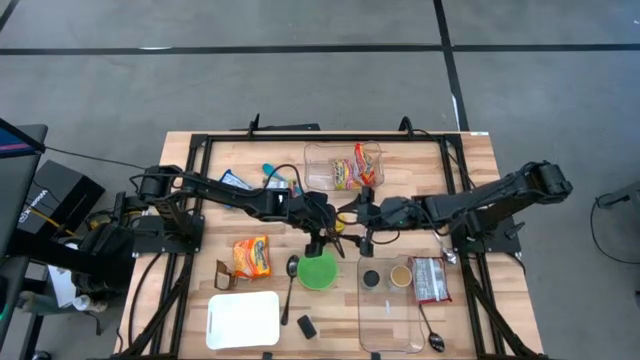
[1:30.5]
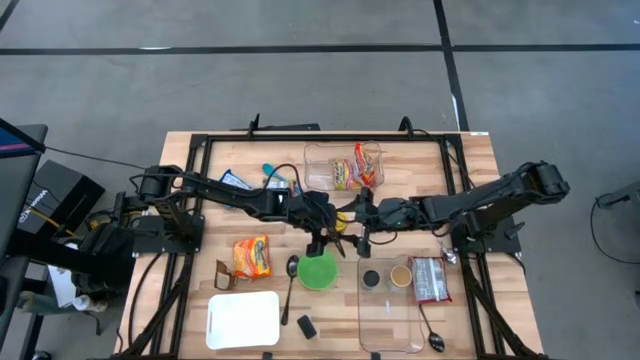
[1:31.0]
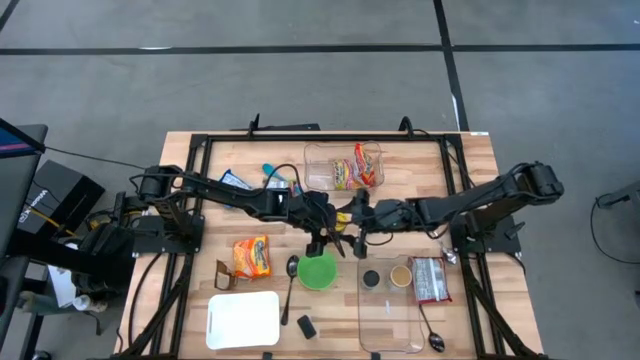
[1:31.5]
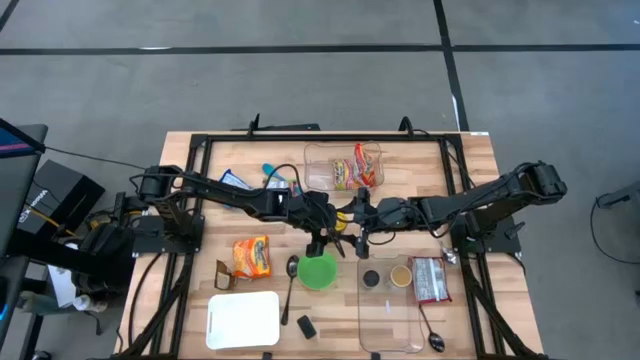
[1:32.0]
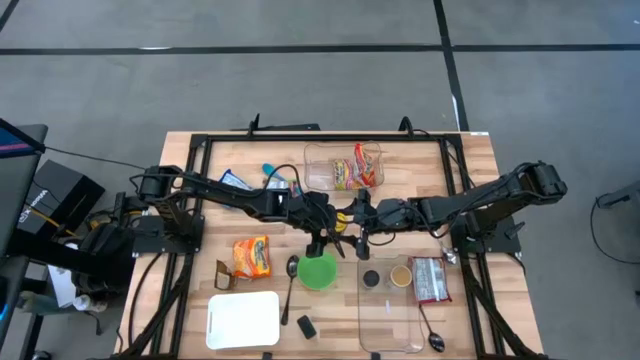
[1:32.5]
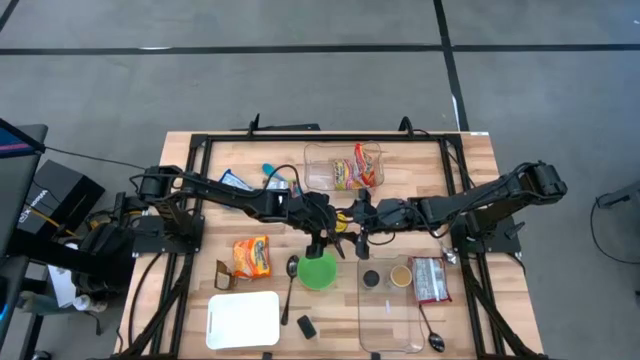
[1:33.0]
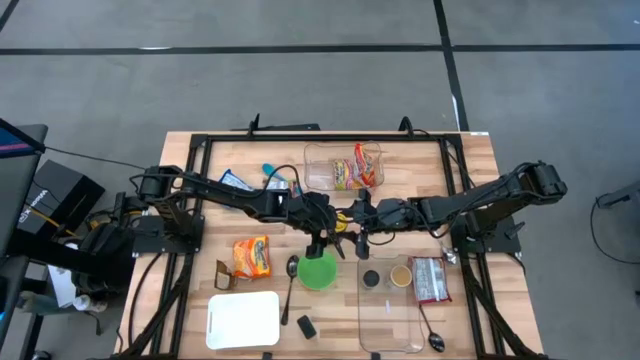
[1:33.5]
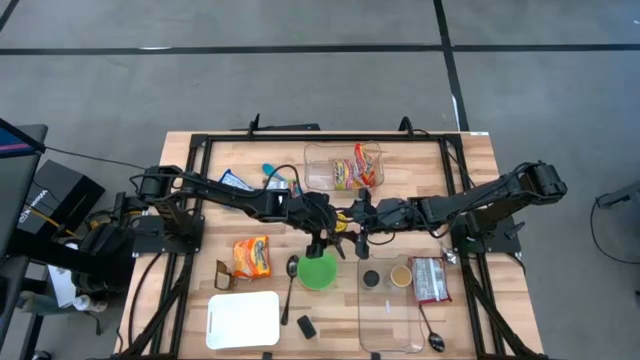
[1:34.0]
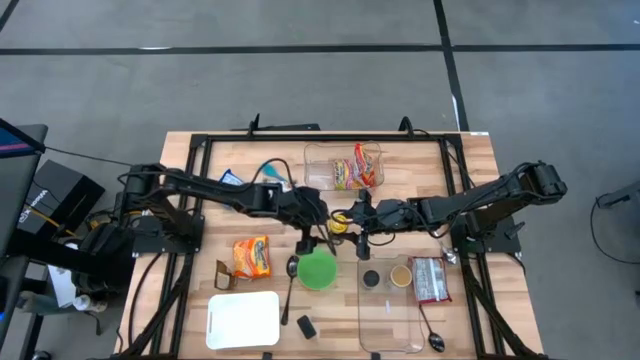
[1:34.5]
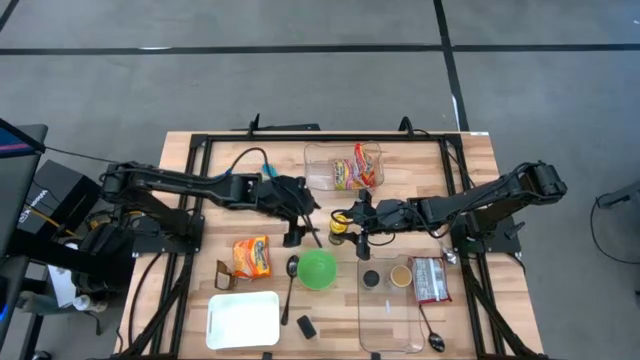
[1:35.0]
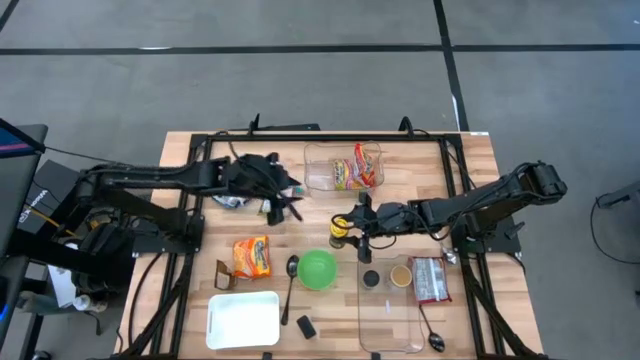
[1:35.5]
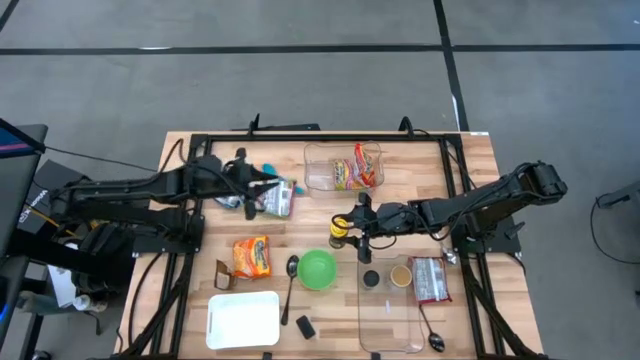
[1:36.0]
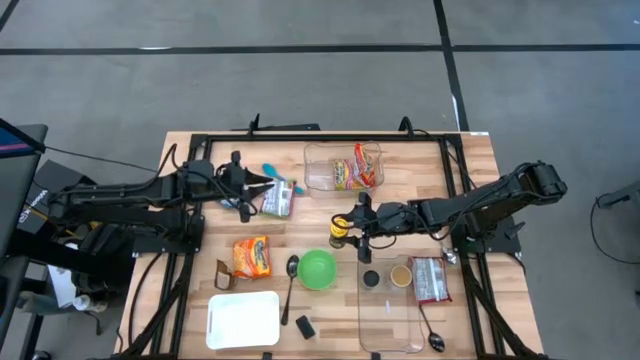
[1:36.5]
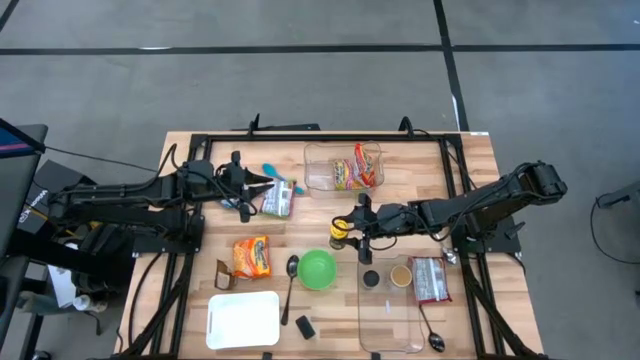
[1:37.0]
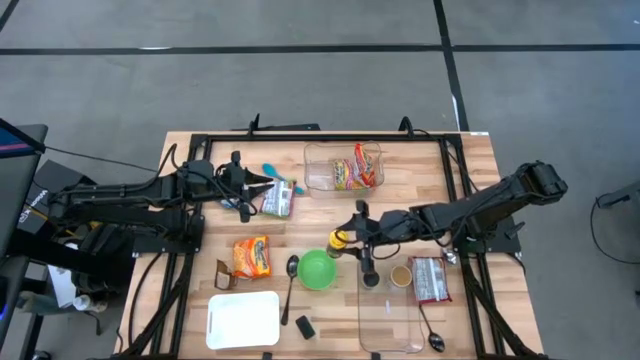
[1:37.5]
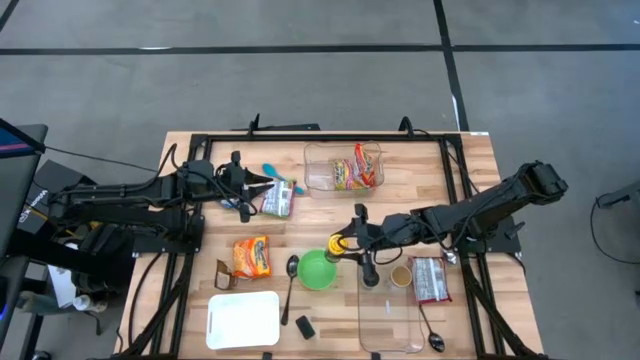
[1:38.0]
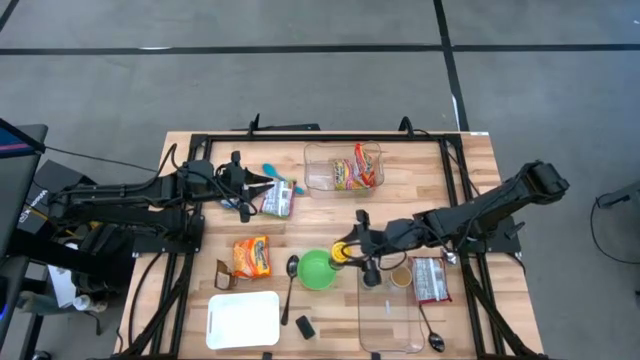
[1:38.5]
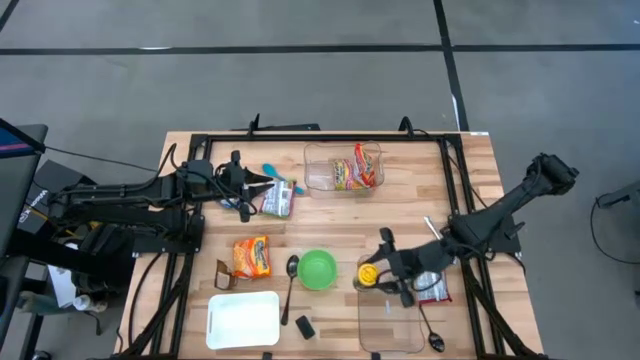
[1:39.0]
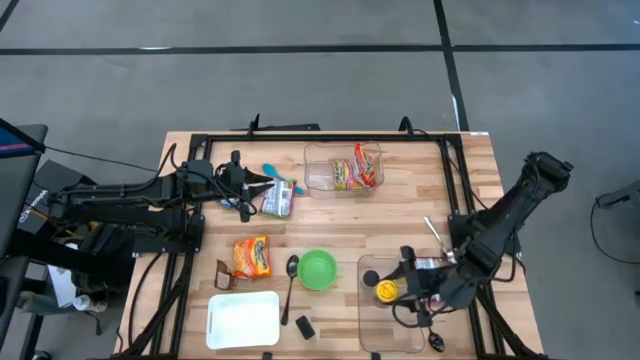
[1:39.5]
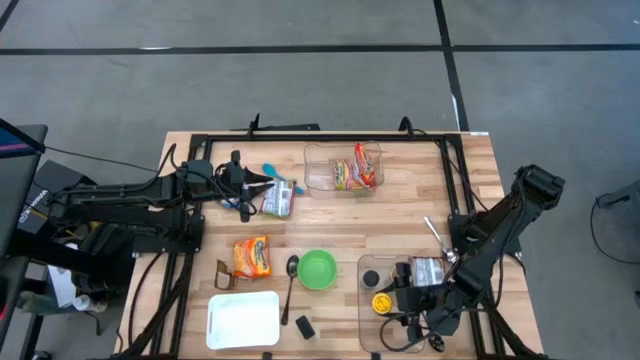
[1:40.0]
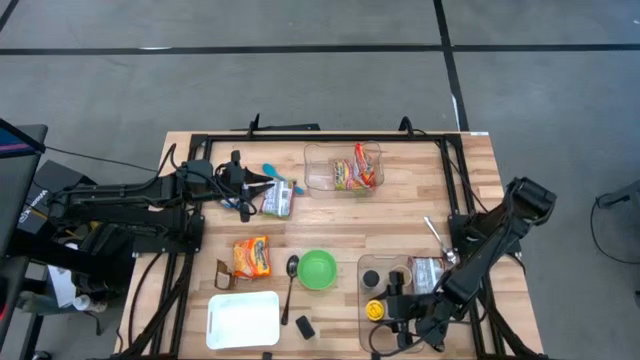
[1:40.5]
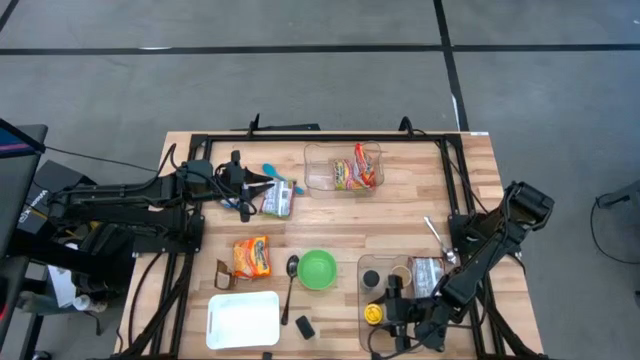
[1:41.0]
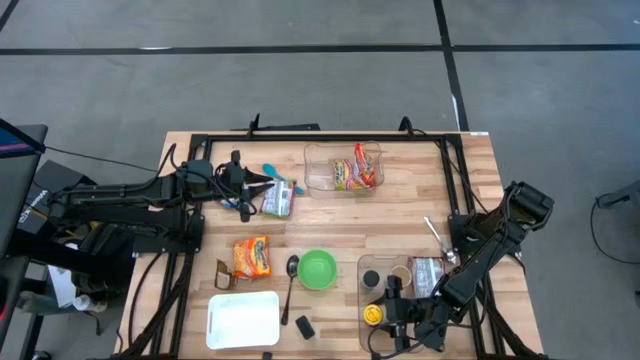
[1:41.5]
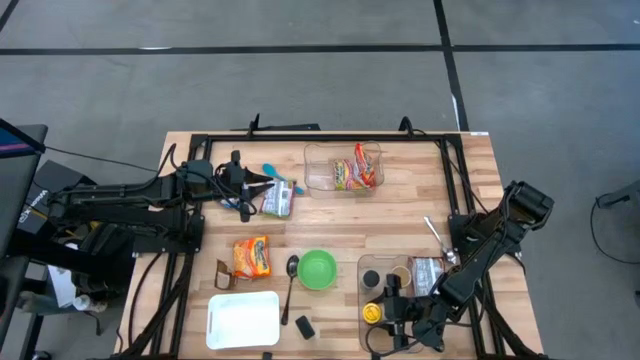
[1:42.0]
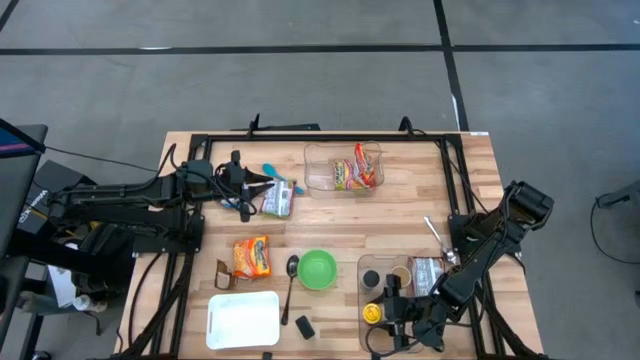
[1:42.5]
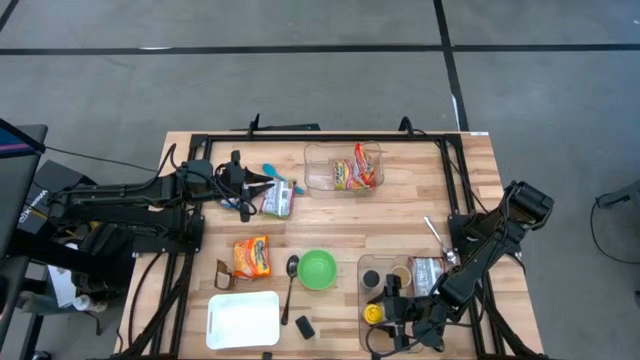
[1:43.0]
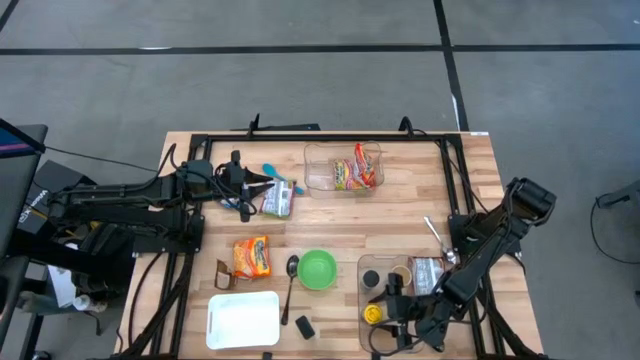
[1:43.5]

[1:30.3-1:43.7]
Task: Pick & Place Food Item
Put the black seasoning into the bottom transparent bin

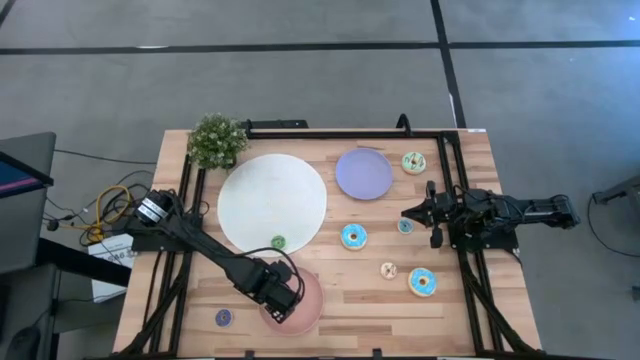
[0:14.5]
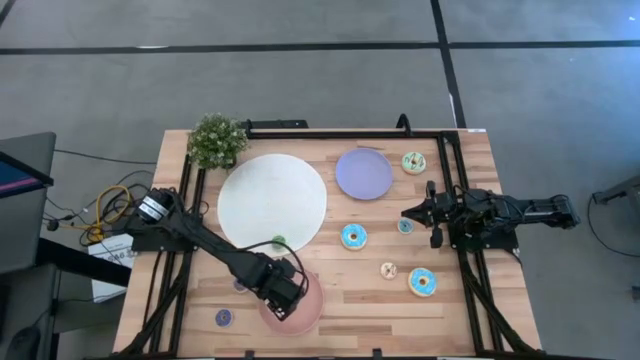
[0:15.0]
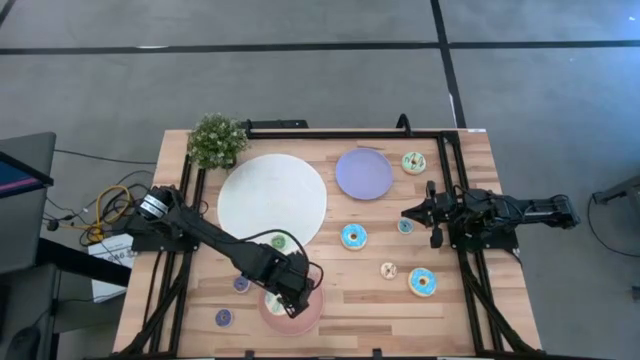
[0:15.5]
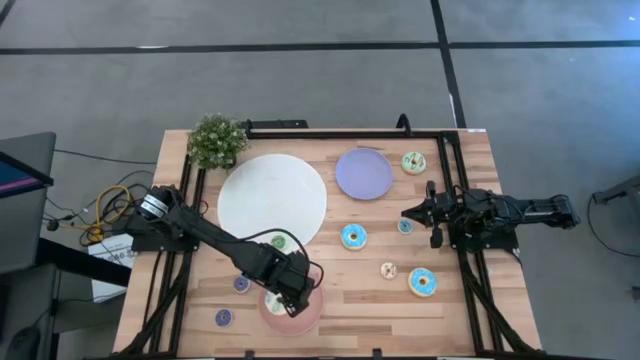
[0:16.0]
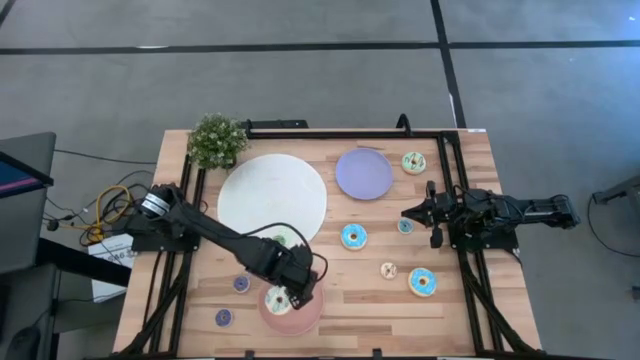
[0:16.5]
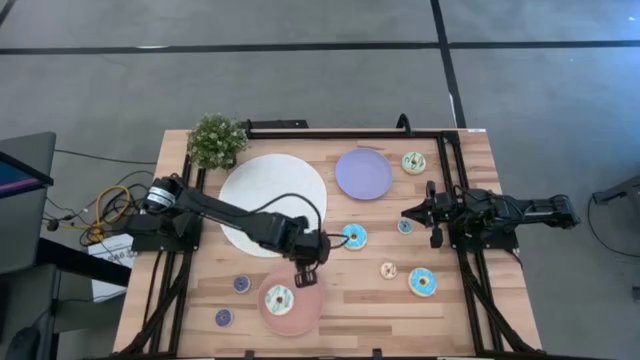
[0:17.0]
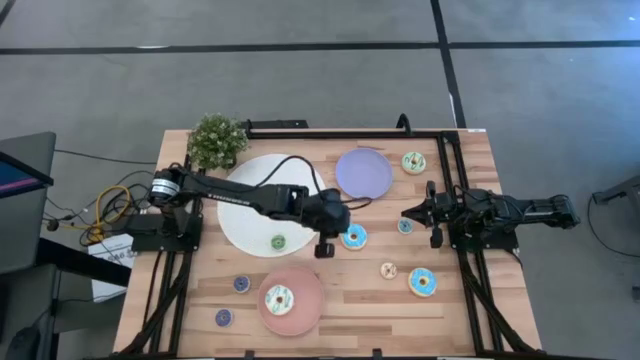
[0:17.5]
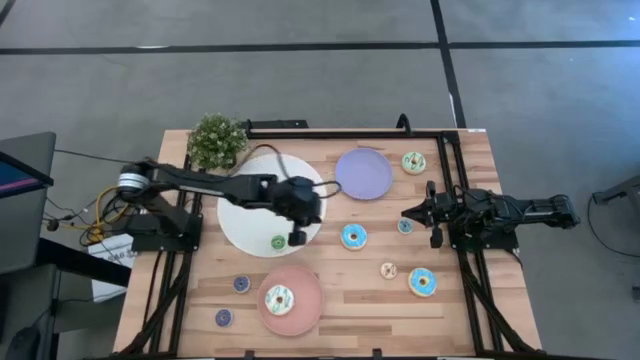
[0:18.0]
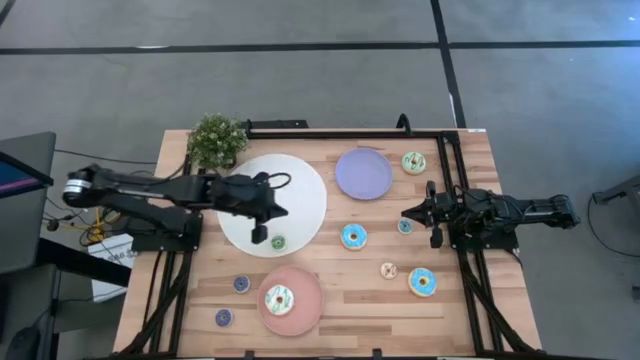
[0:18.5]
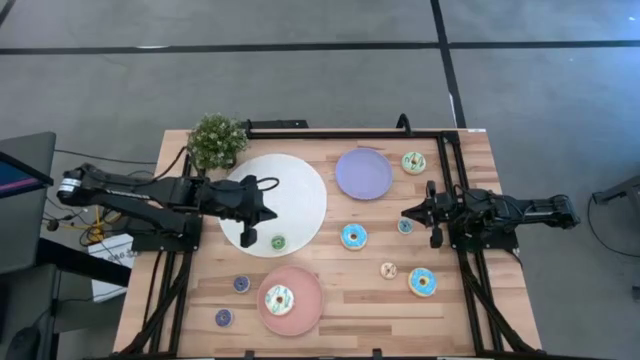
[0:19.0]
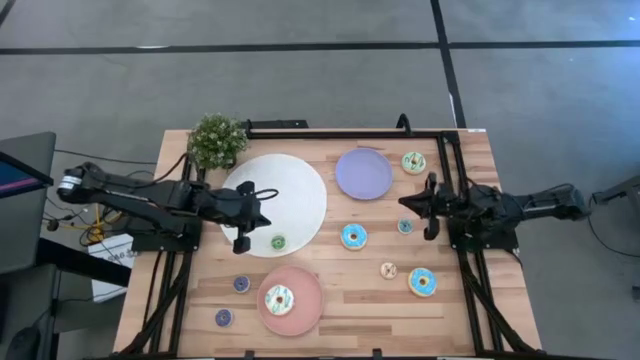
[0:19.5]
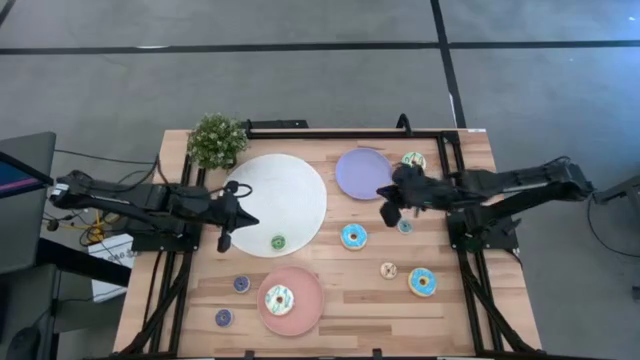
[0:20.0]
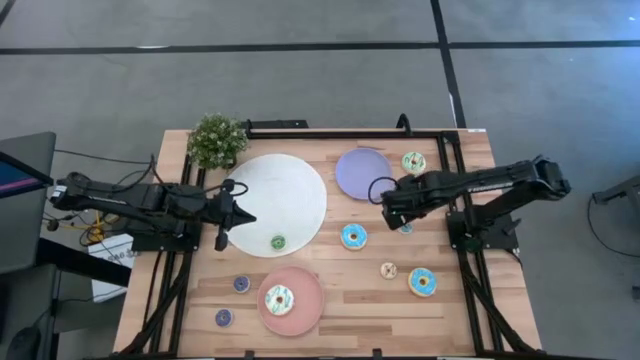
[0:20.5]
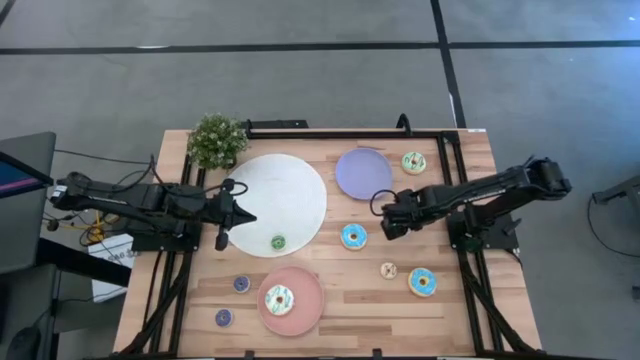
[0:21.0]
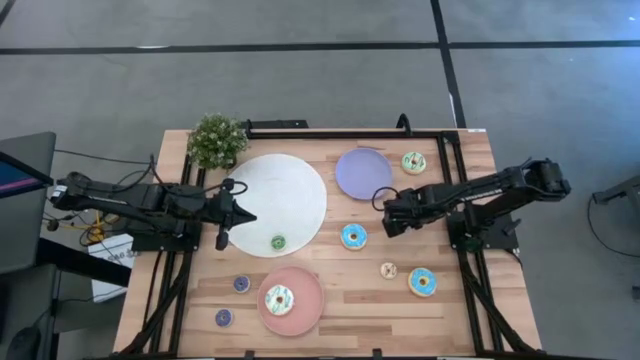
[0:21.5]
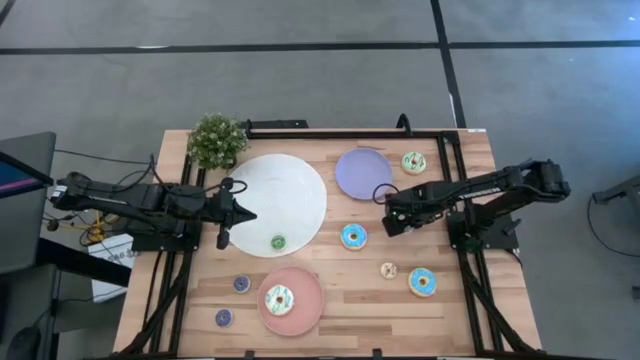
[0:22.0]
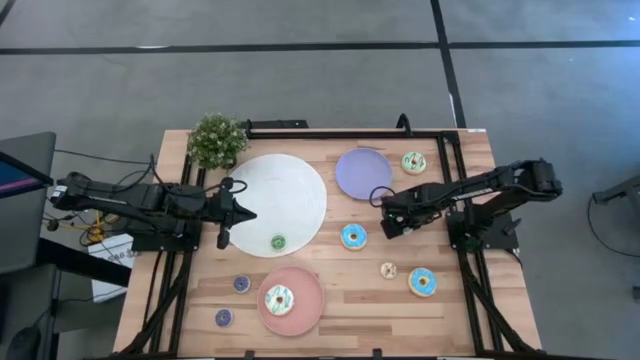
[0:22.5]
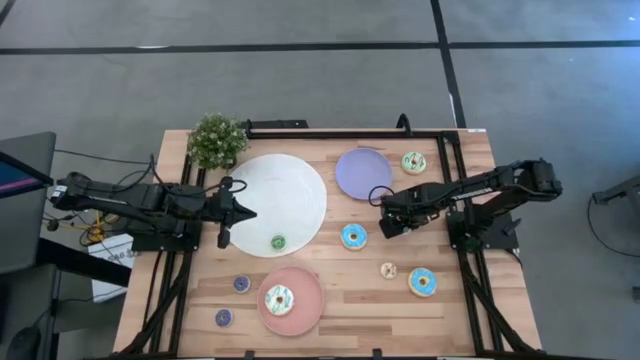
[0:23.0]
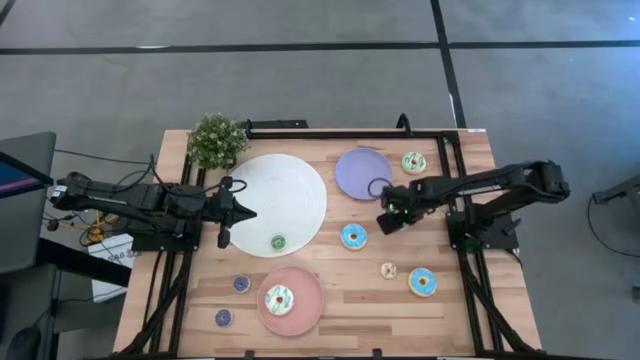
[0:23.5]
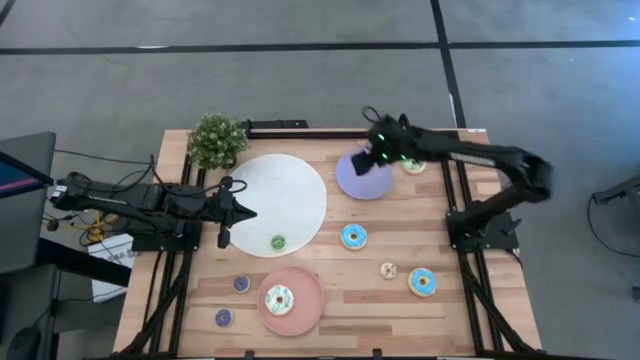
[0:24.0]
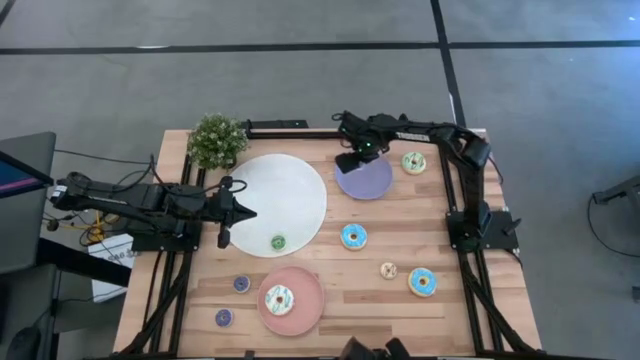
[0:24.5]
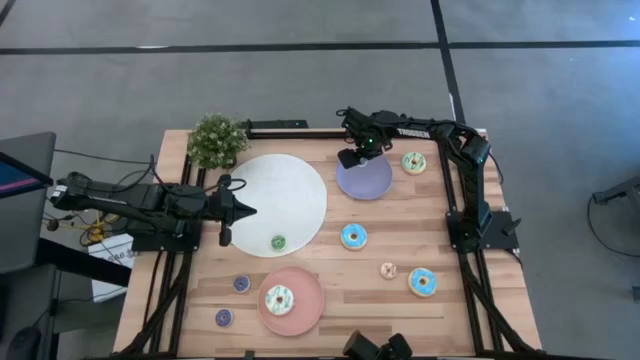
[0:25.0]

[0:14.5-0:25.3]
Task: Pick & Place donuts
Put the small blue donut on the purple plate
